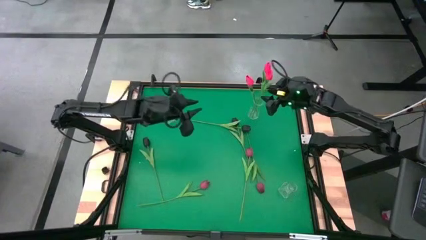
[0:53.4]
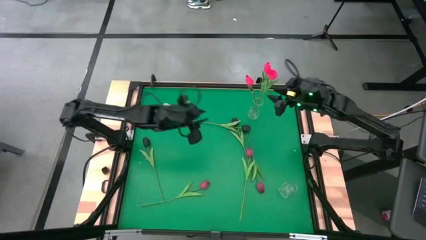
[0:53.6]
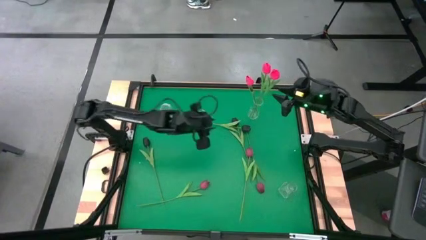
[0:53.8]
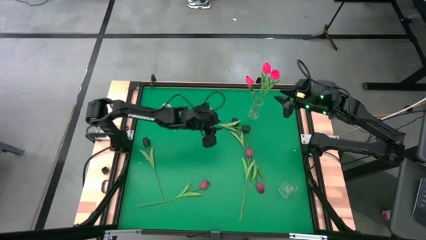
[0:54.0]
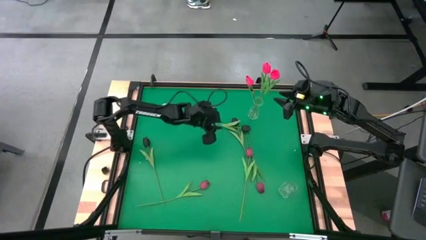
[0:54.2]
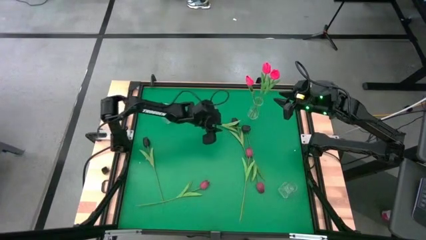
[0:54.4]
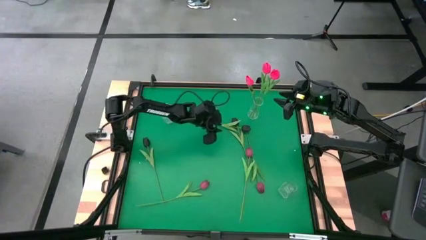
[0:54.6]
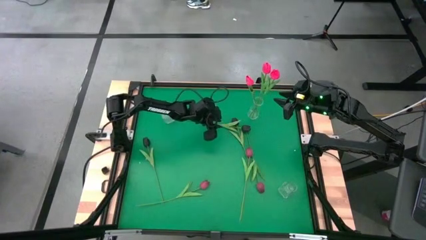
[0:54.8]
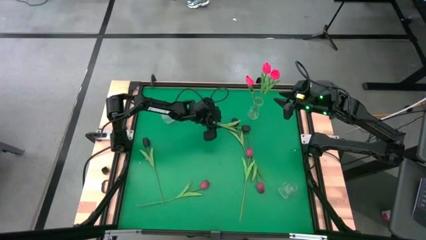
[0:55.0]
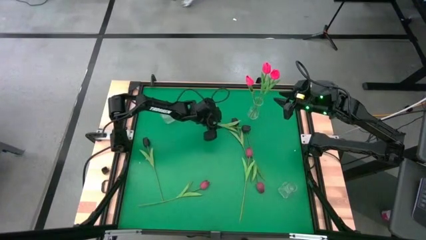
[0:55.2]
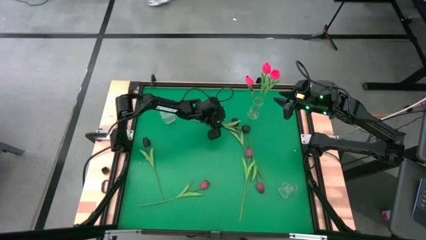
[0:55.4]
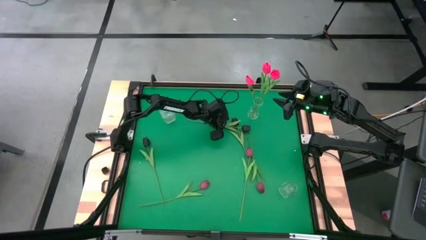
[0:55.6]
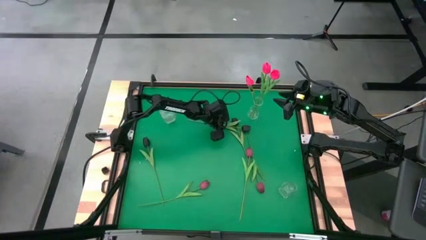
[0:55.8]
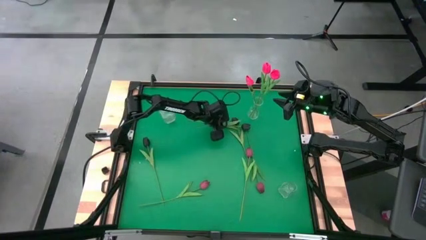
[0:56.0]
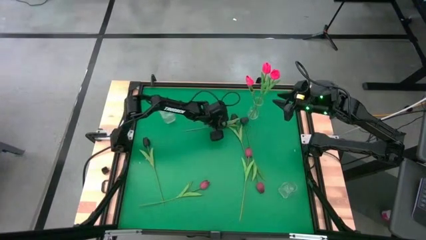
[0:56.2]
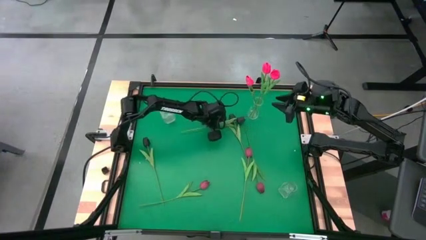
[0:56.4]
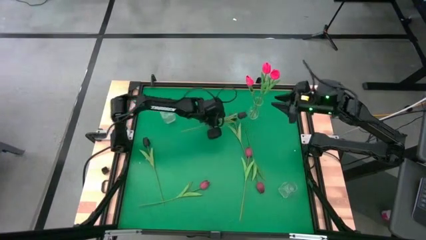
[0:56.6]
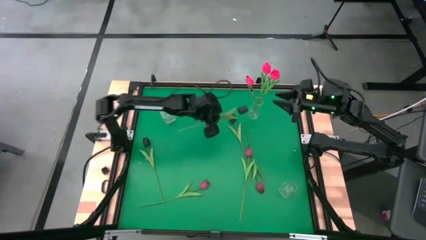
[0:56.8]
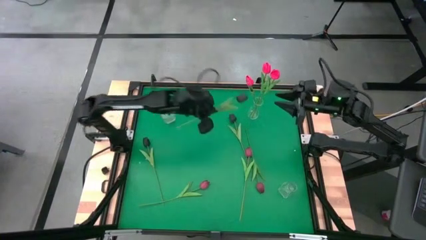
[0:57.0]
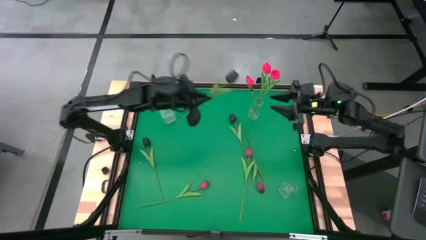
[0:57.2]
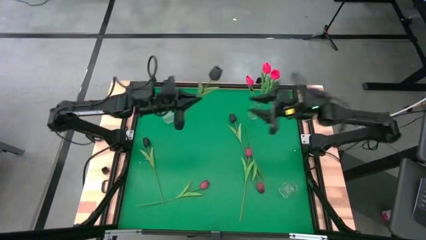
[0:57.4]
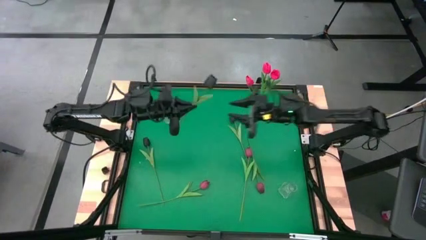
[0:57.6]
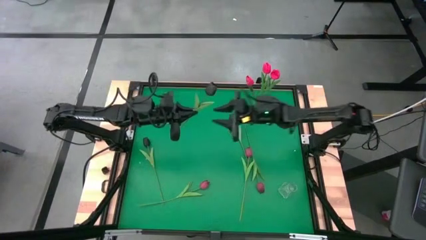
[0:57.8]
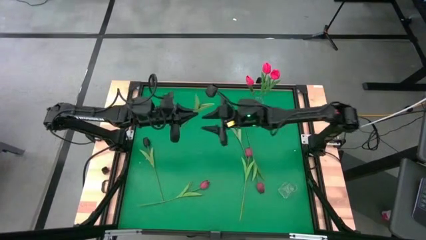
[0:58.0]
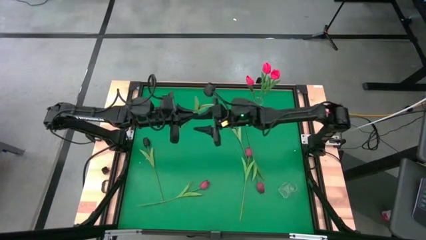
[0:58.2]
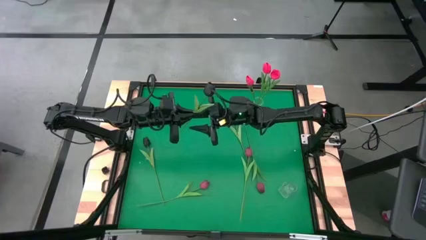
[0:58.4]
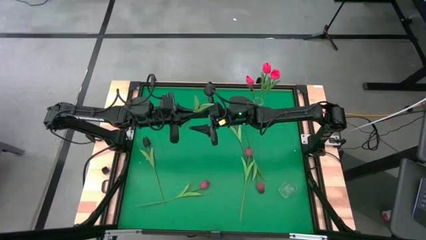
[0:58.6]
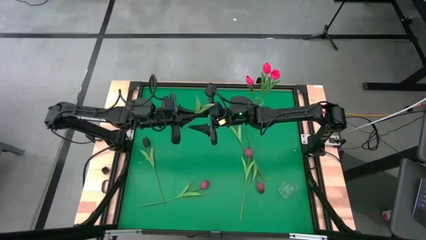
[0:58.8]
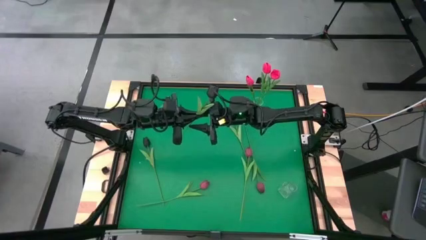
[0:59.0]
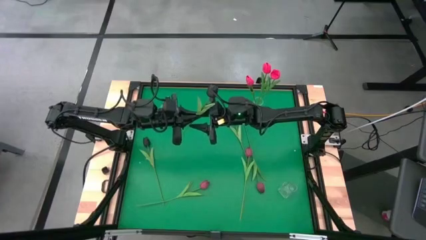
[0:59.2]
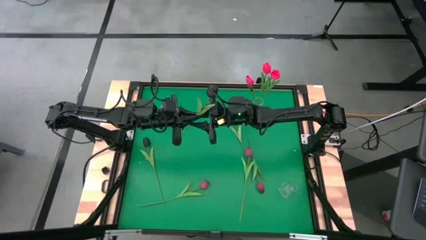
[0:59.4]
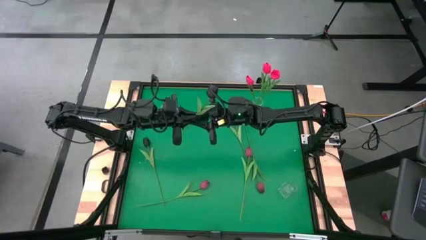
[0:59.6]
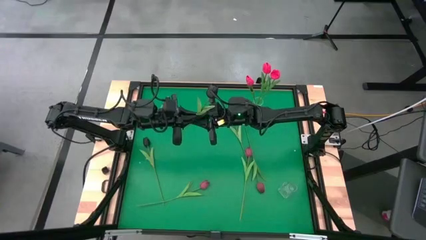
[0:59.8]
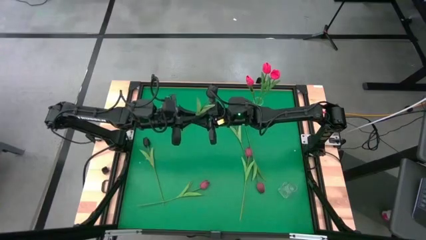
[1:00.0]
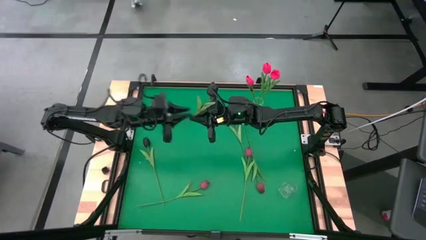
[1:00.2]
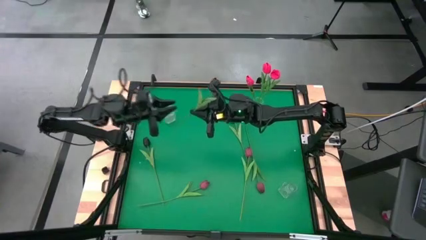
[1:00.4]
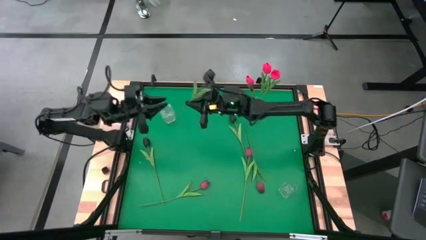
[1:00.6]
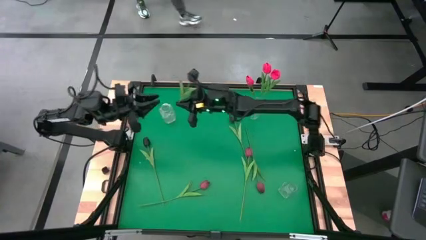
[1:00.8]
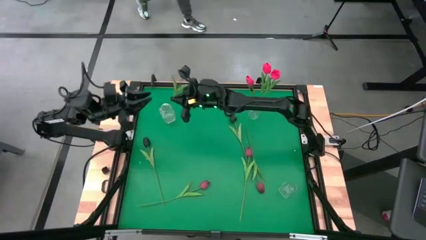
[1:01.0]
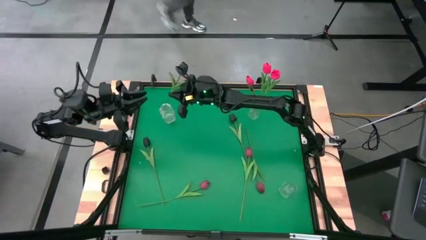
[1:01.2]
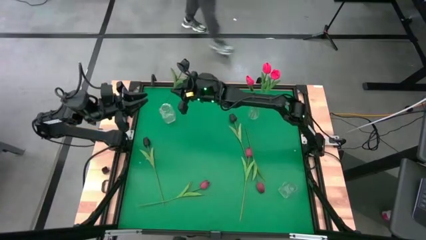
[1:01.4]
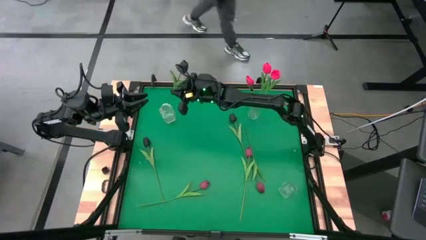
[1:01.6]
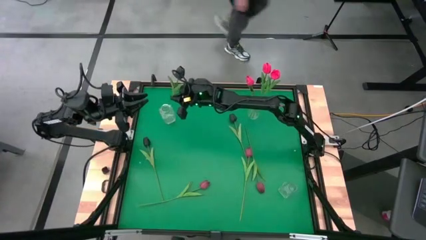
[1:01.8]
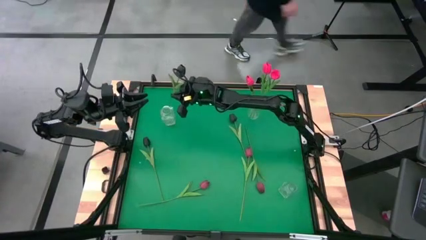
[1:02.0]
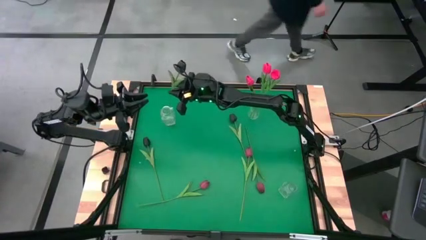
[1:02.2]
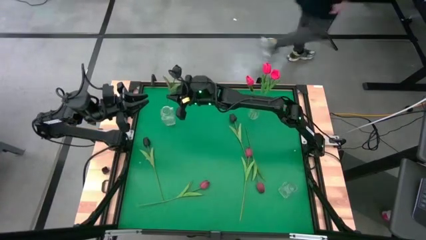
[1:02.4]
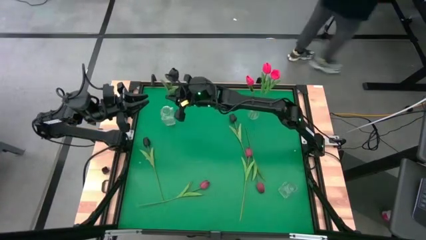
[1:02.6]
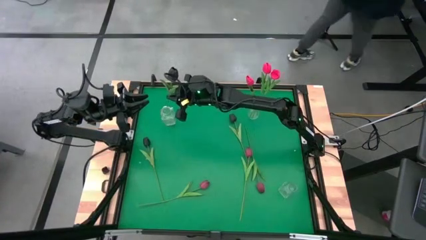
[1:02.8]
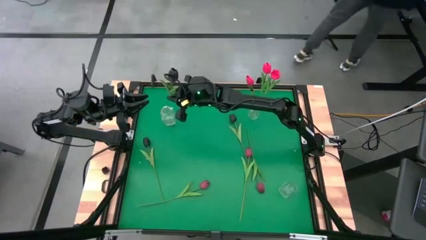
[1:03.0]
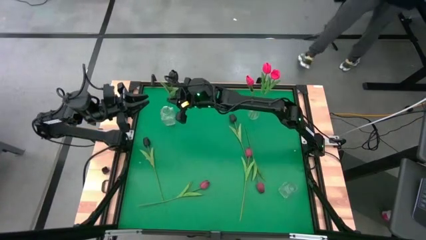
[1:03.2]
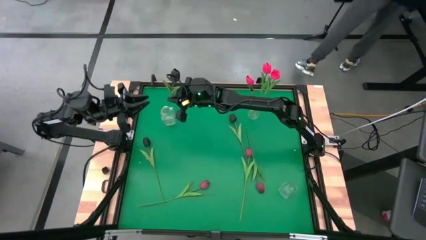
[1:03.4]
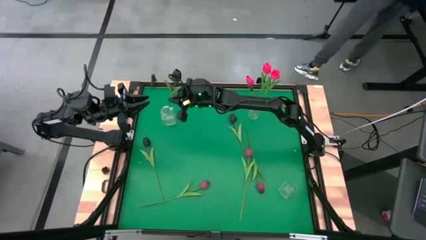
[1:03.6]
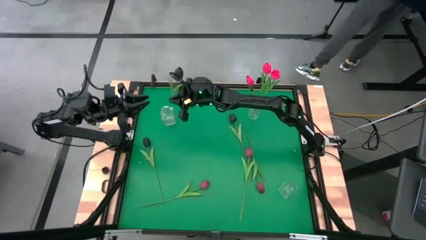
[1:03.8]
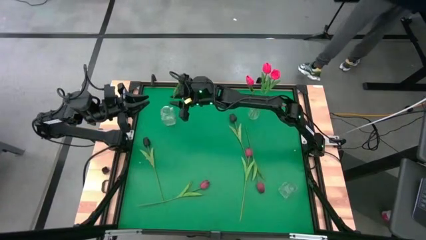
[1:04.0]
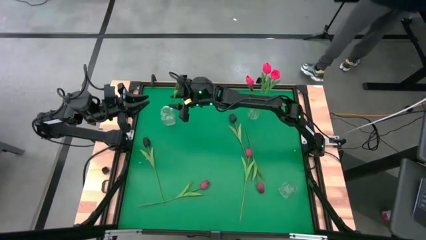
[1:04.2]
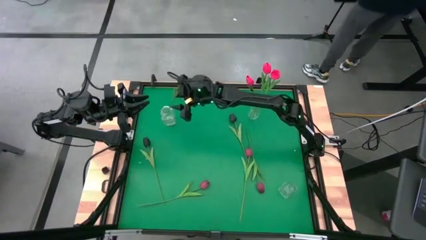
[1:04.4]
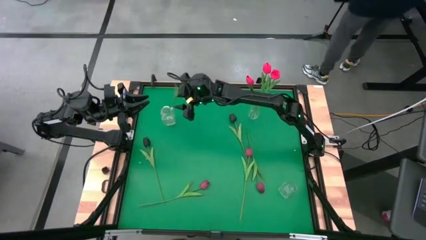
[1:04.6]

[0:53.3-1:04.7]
Task: Sort flowers into vase by color
Put the middle black flower into the top left transparent vase

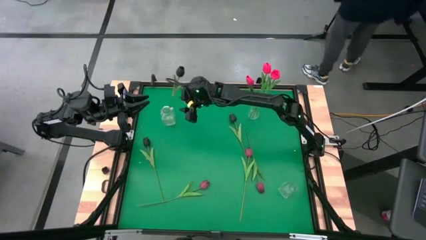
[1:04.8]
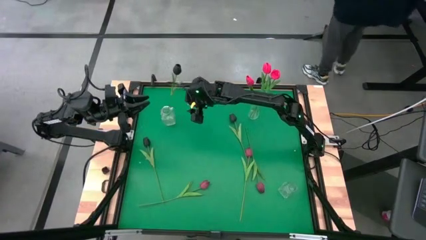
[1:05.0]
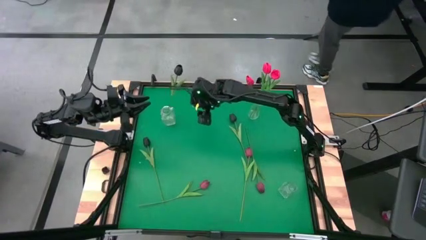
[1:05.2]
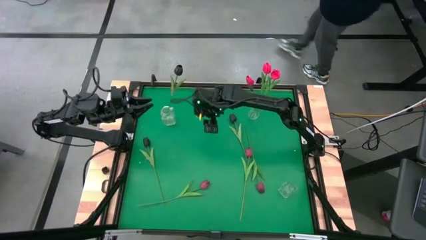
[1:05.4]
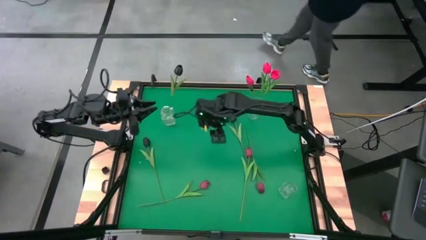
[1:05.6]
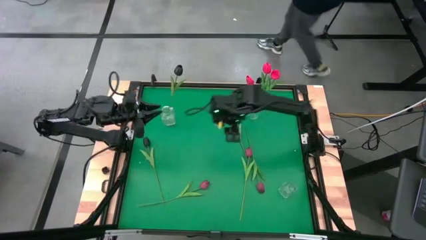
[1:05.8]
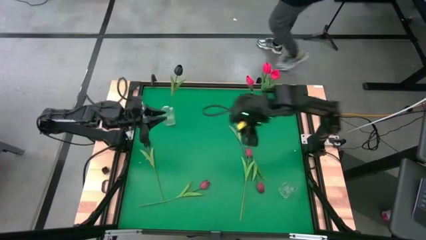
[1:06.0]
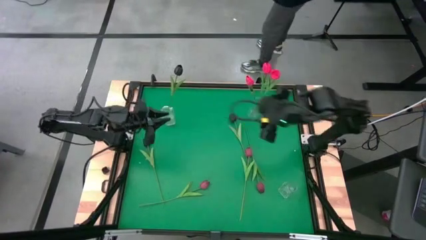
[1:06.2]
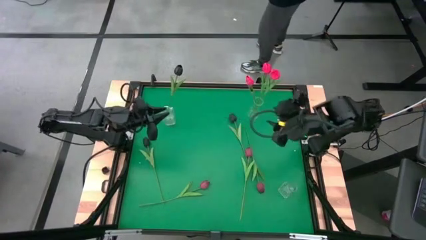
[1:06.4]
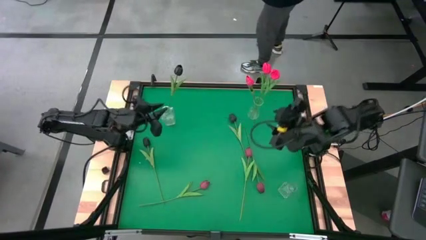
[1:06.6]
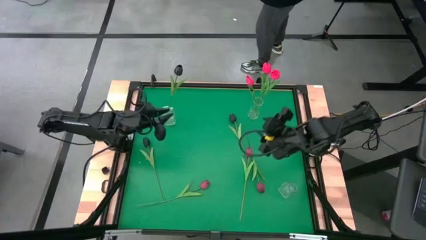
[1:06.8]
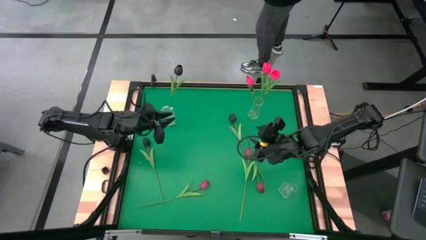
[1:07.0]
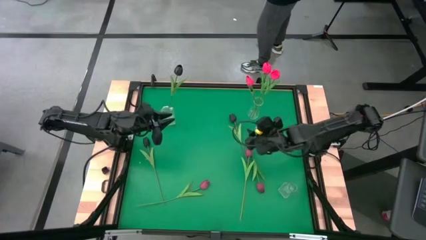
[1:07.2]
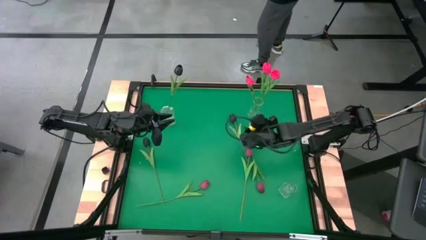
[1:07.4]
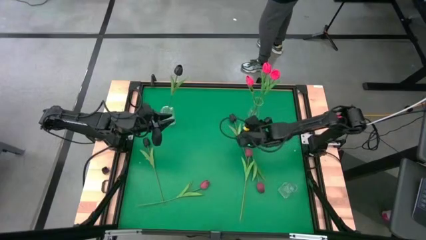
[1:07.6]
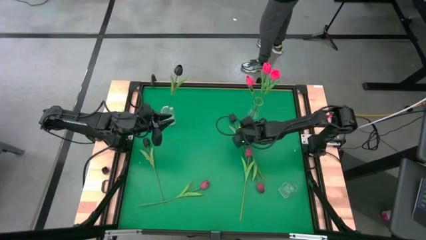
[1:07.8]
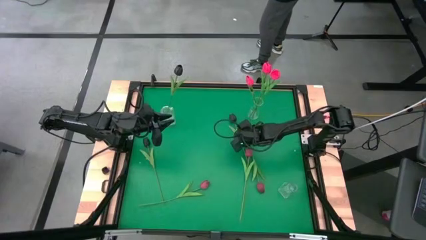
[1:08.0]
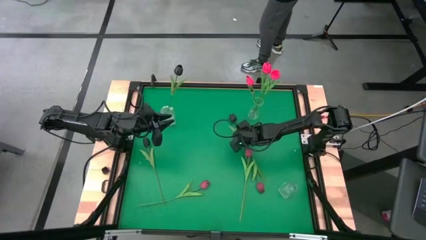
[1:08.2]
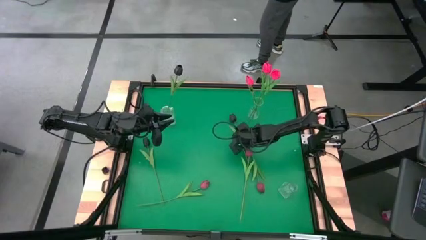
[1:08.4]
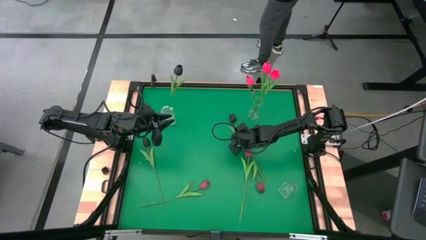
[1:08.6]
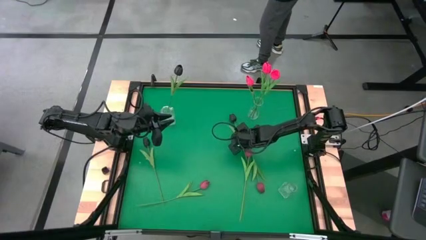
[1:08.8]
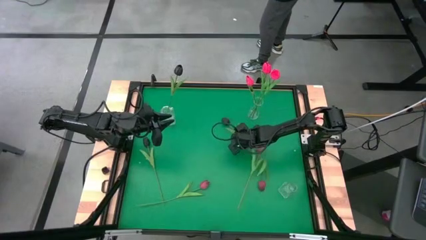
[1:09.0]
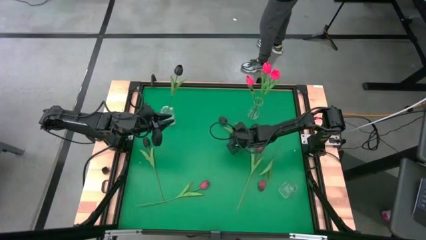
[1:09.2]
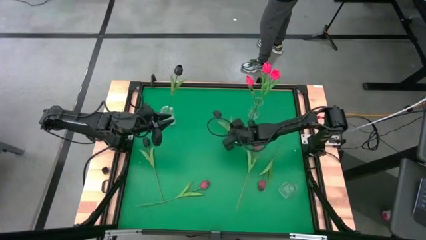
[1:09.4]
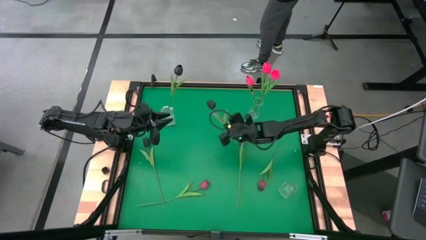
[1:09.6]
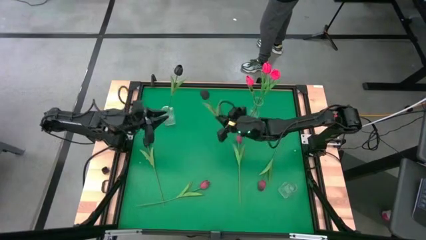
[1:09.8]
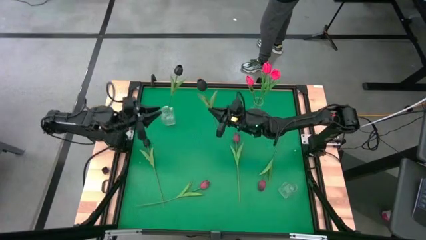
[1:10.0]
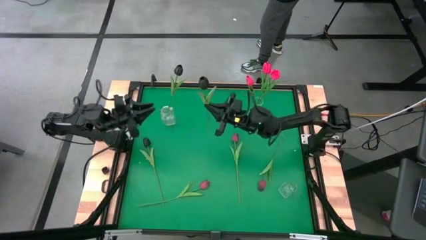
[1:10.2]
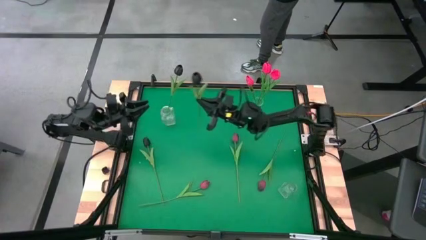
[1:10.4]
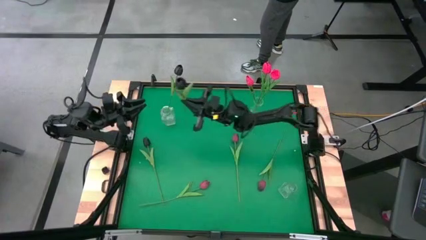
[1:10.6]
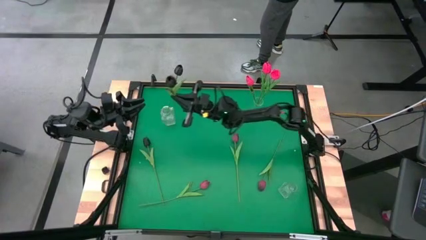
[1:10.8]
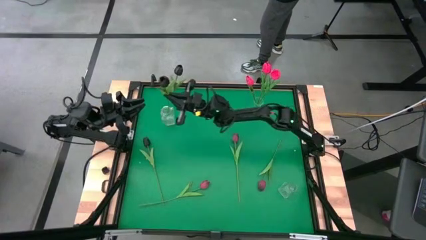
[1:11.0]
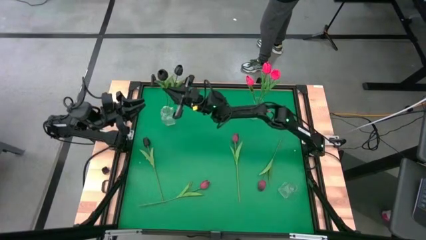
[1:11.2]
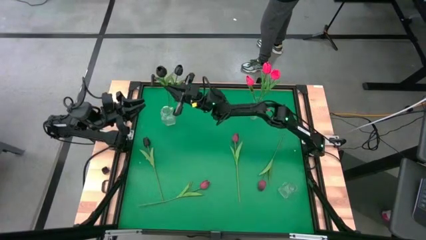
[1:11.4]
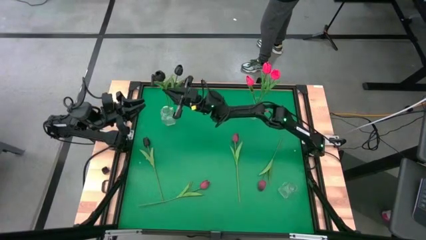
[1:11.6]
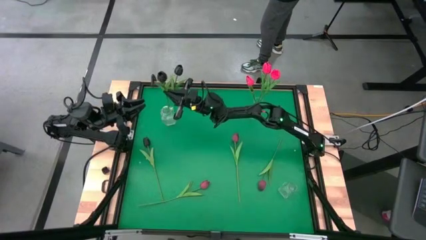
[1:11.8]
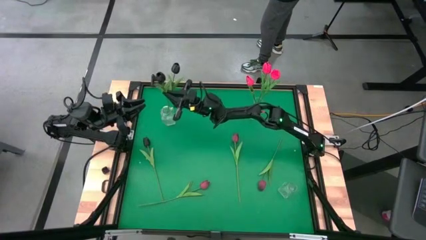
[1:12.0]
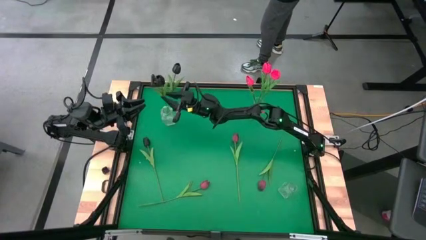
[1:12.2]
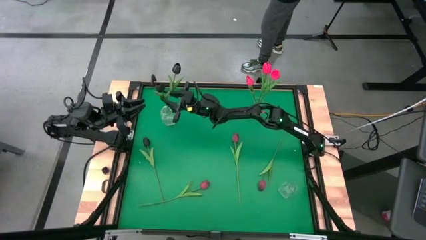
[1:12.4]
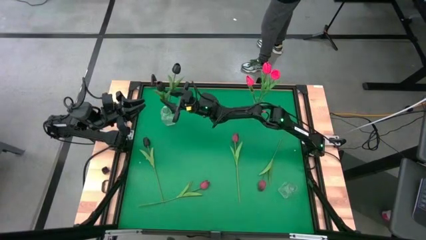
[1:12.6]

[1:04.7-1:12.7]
Put the right black flower into the top left transparent vase
